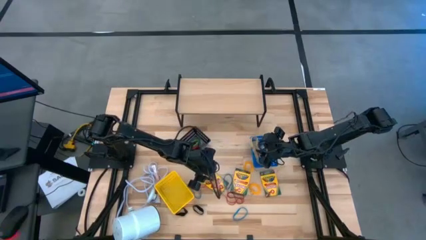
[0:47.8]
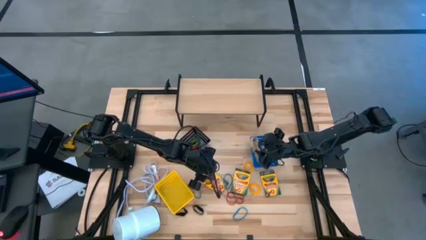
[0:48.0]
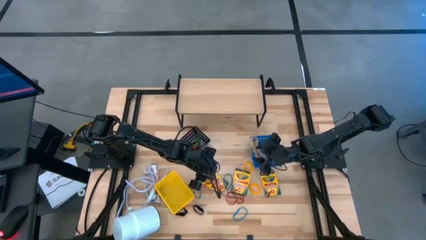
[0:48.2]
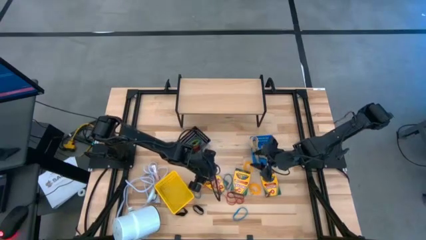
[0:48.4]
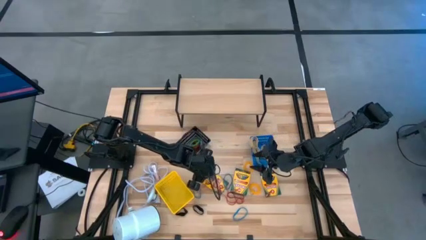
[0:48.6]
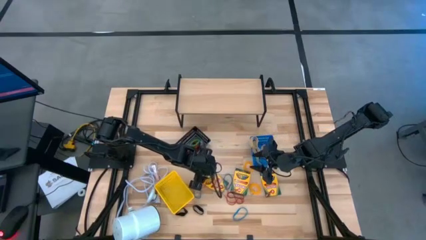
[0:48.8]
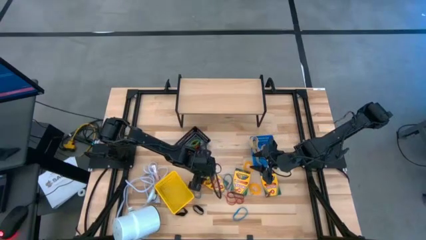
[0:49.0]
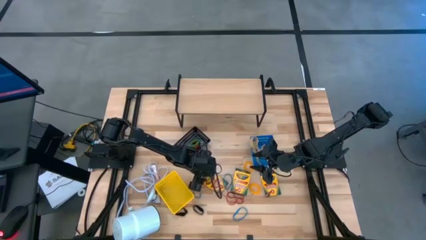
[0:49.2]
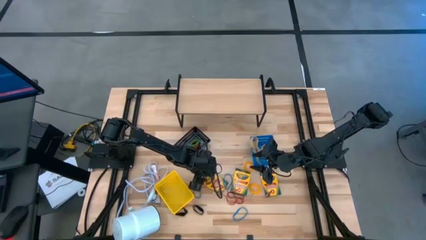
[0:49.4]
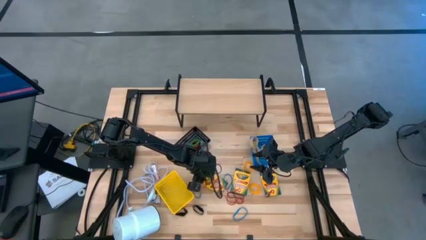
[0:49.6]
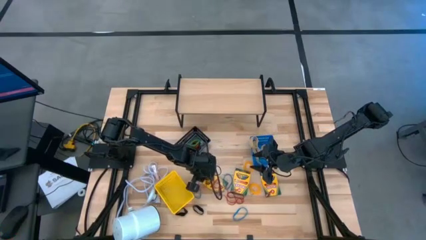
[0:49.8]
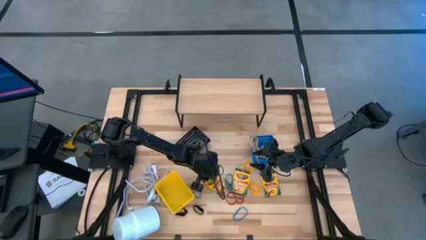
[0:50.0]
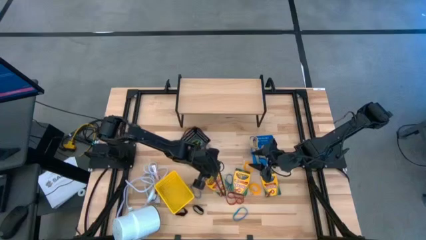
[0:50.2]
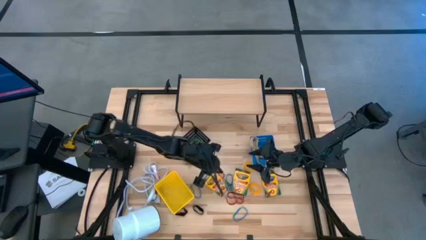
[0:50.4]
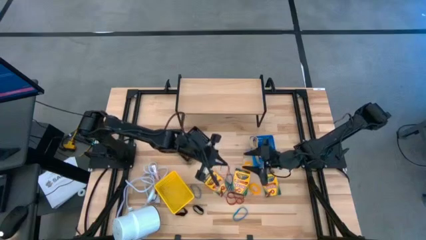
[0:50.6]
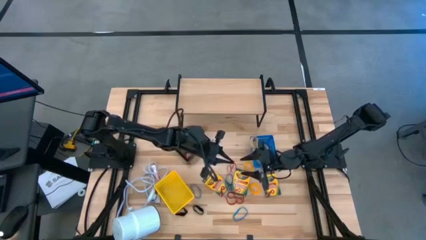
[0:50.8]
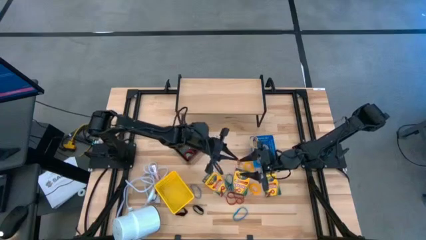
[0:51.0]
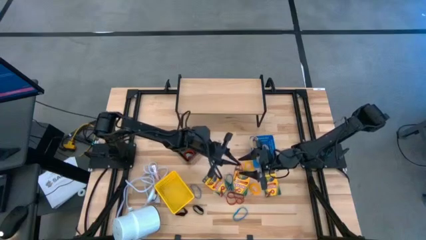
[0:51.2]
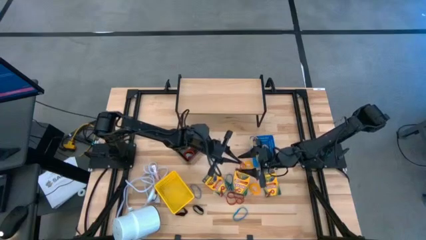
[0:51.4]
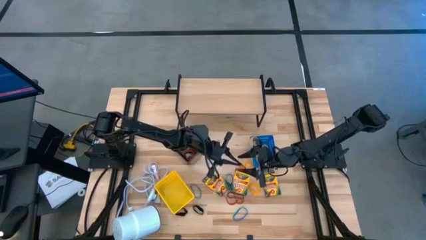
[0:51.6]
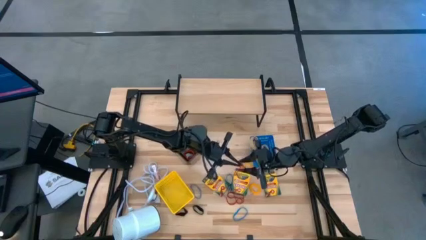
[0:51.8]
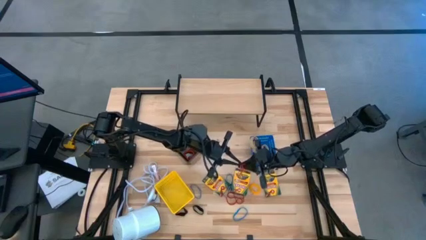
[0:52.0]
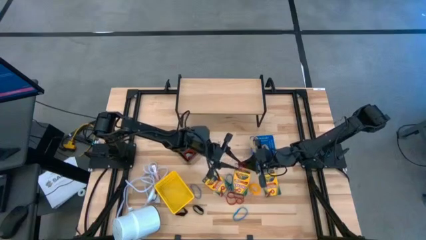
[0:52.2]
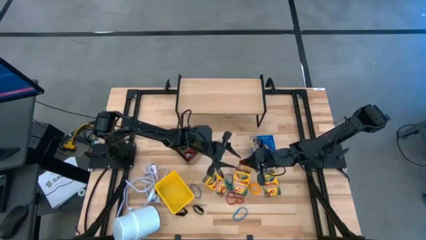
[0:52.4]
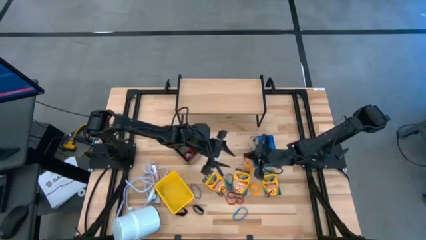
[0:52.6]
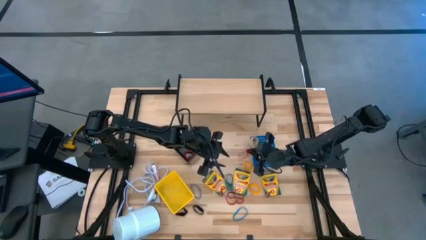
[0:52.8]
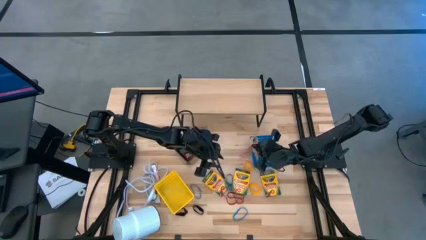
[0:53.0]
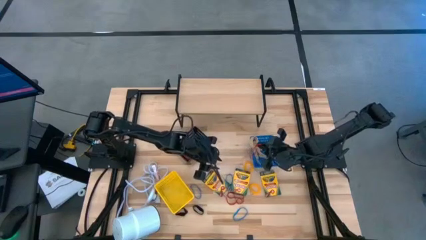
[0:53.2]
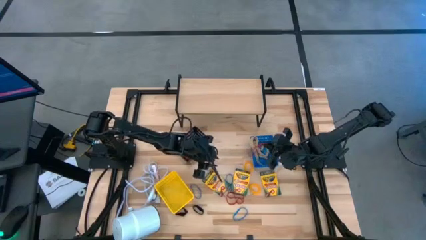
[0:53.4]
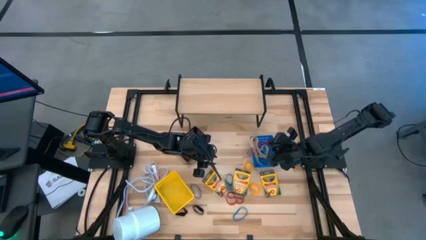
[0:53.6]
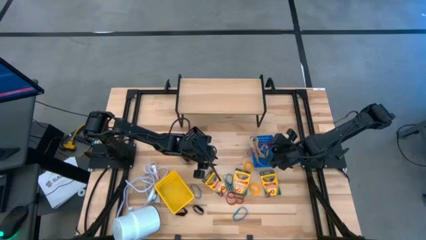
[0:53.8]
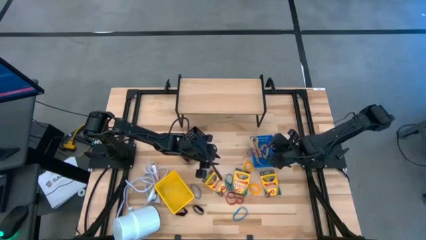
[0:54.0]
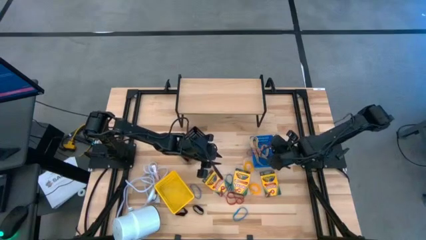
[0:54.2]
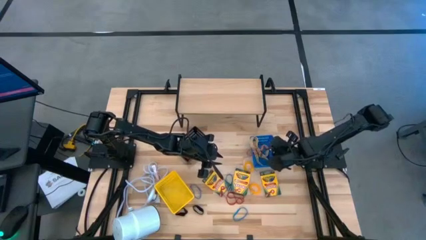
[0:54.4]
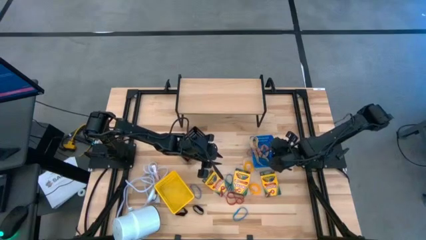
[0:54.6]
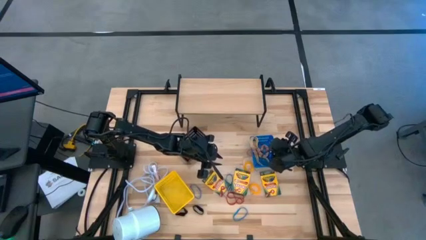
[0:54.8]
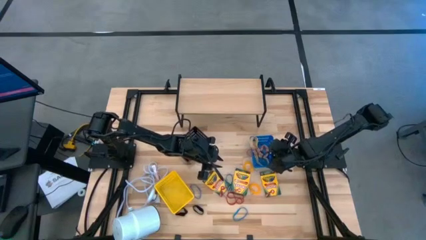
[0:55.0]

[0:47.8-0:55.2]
Task: Pick & Place Office Desk Supplies
Put the red rubber band into the blue bin

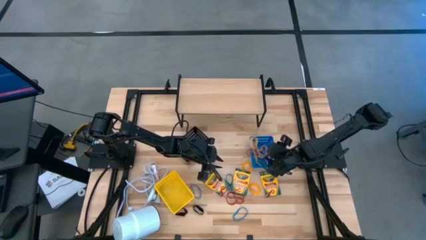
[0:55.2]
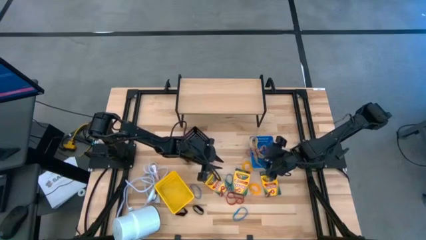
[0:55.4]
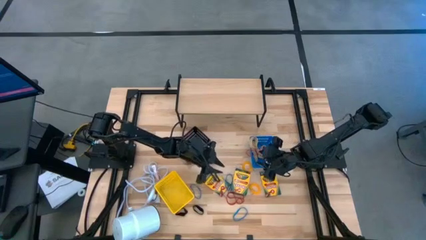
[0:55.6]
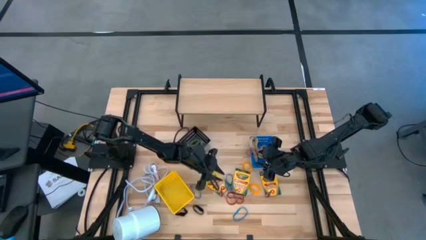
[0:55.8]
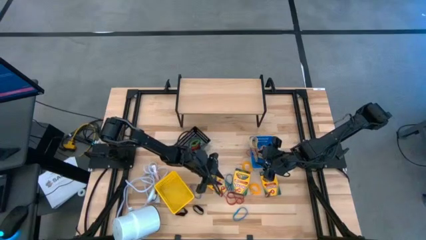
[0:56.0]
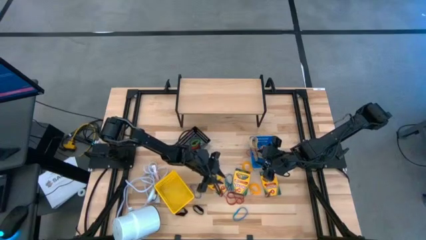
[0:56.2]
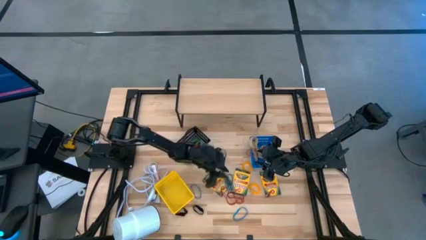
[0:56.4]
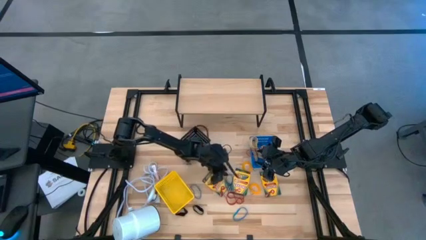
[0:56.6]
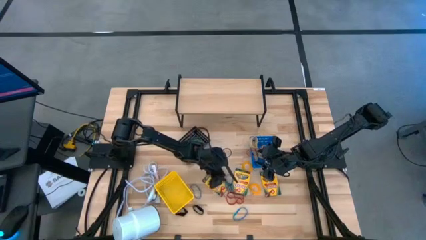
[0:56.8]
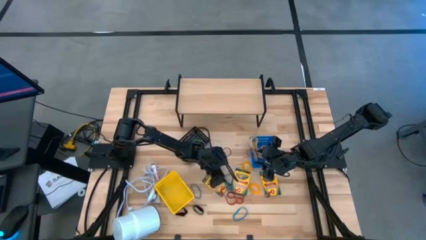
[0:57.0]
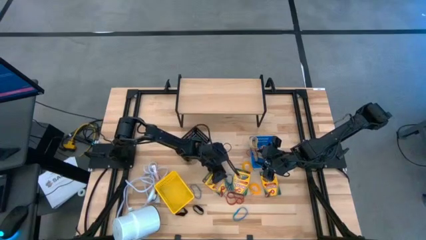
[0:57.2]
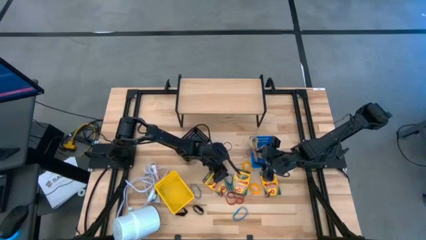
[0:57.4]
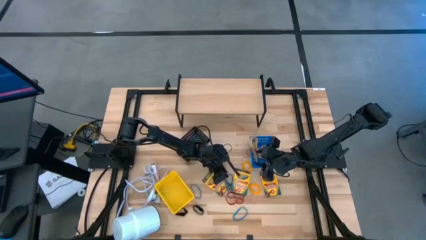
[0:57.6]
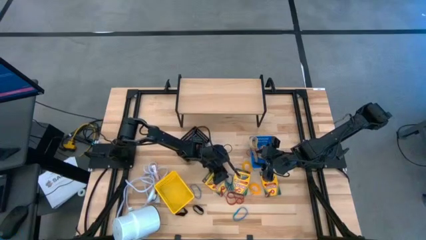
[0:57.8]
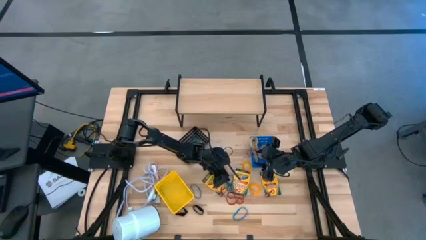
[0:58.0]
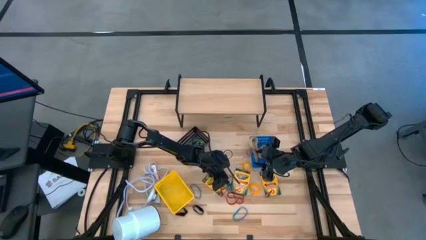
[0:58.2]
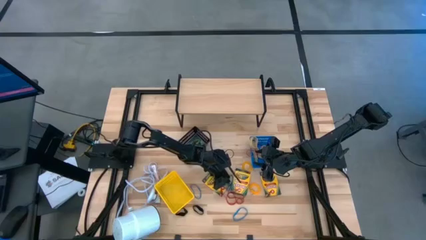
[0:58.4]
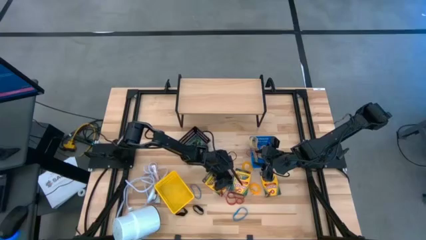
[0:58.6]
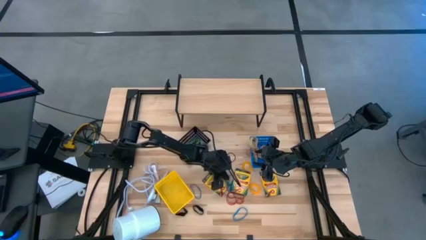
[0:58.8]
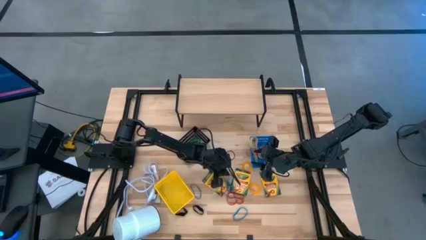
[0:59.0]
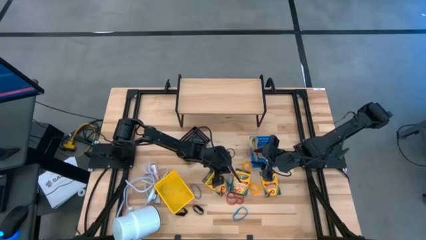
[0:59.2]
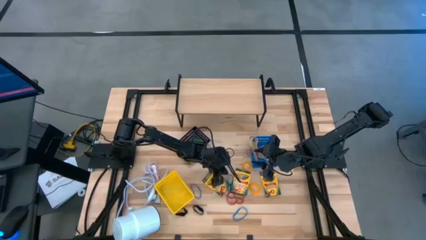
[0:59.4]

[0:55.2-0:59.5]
Put the blue rubber band into the blue bin

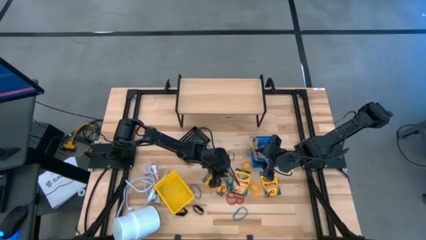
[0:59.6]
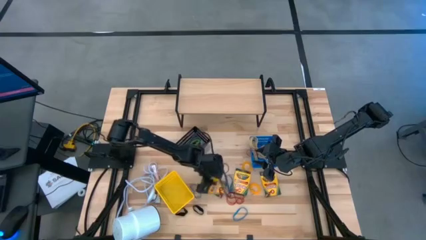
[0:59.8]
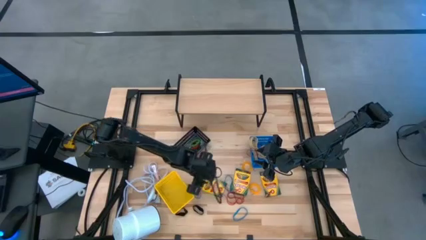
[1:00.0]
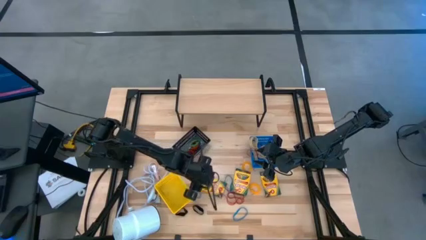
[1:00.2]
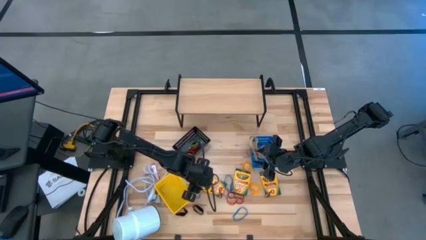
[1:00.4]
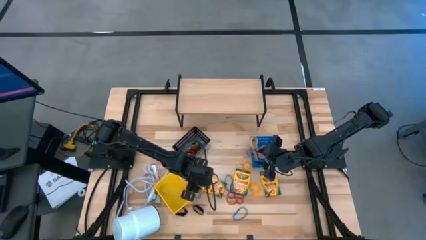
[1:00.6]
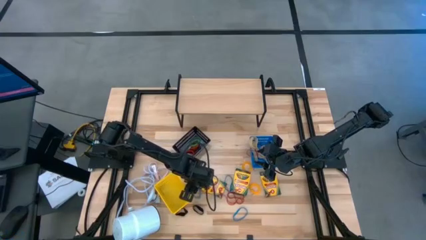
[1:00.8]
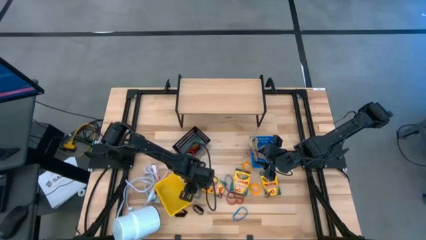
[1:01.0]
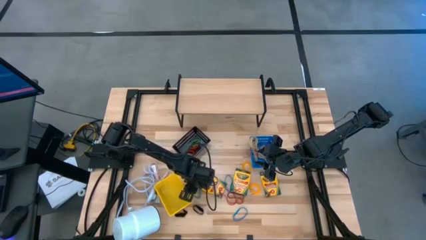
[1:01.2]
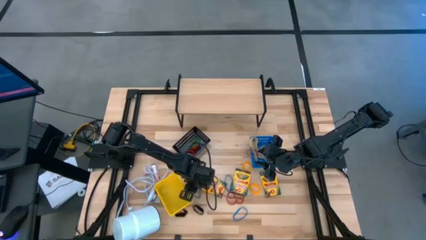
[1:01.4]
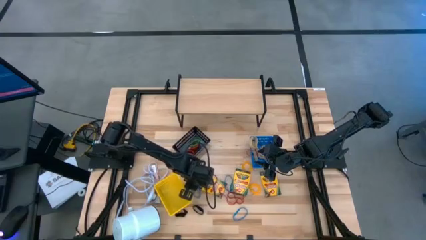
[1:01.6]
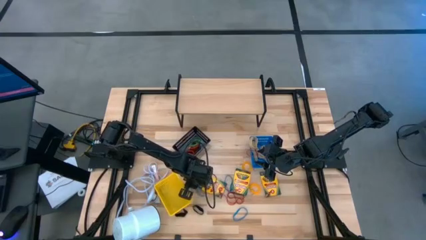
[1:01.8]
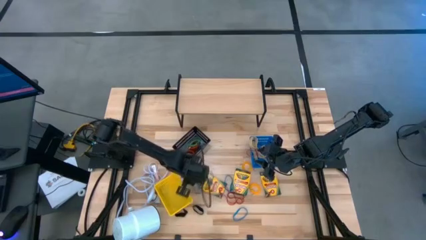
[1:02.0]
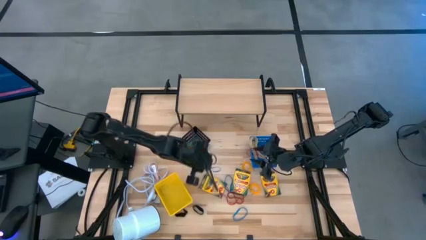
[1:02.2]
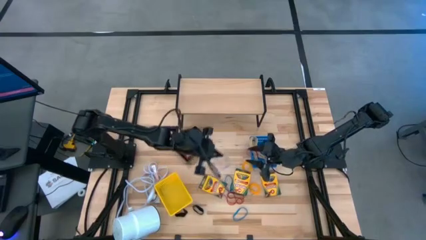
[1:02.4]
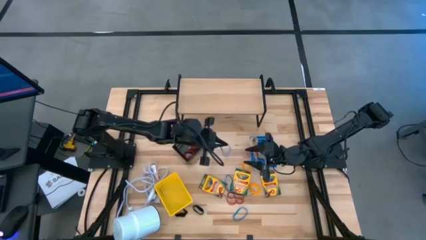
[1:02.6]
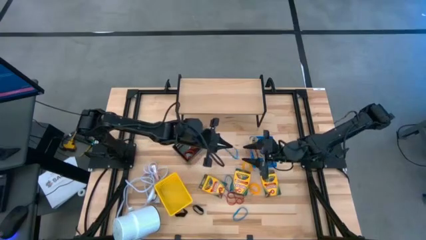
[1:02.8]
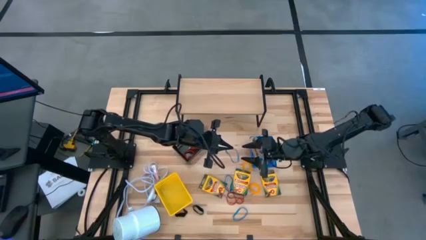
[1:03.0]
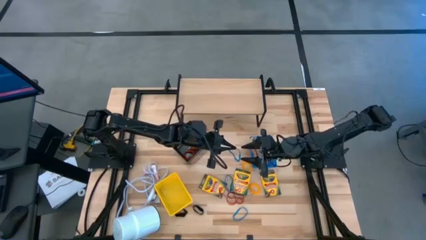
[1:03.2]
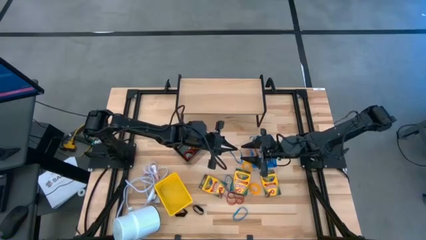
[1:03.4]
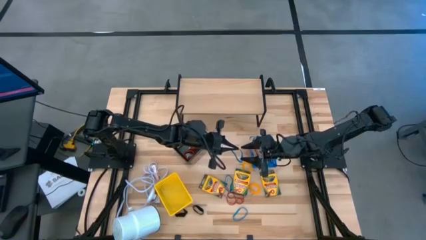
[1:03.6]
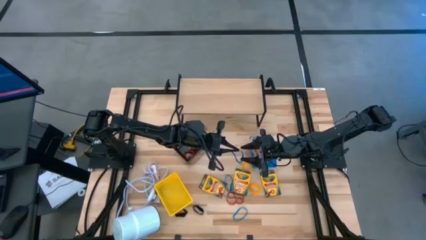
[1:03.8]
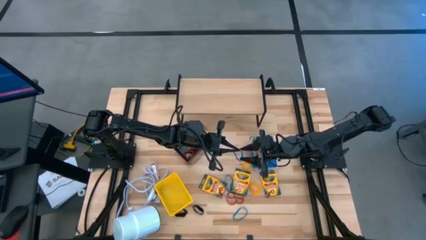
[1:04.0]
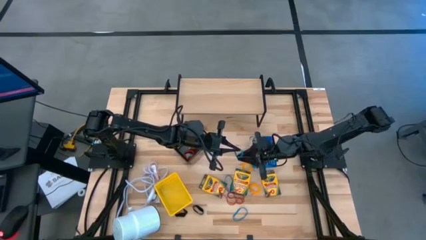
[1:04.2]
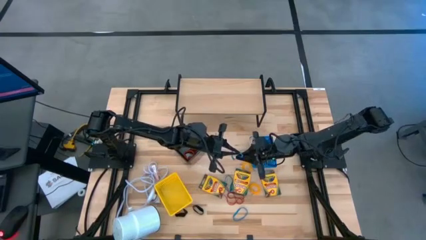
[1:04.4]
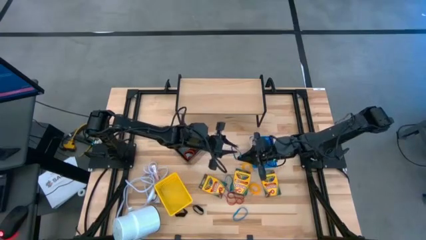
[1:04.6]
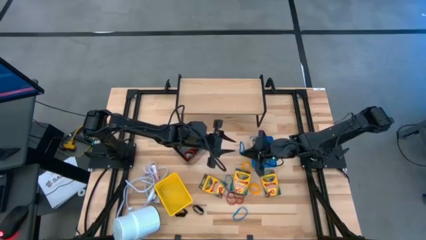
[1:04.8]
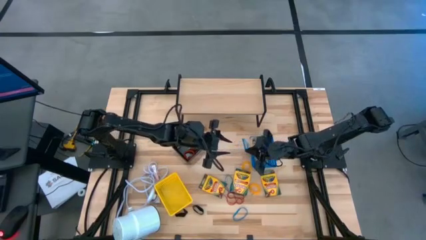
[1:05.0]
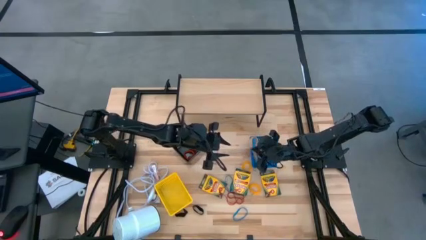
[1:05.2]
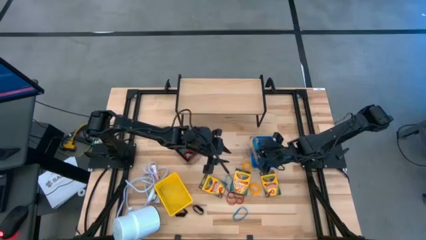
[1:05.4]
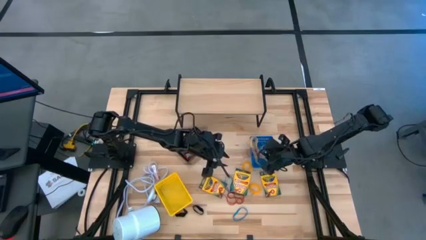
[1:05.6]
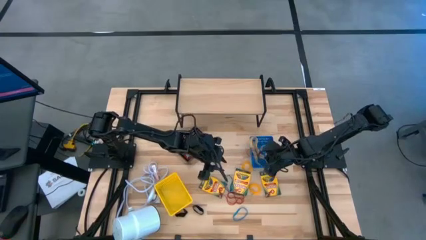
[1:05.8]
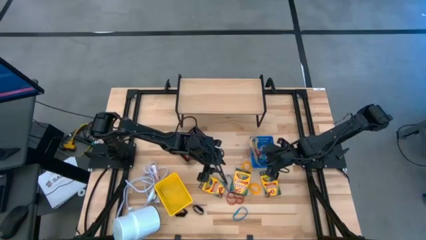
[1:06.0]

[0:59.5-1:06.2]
Put the blue rubber band into the blue bin
